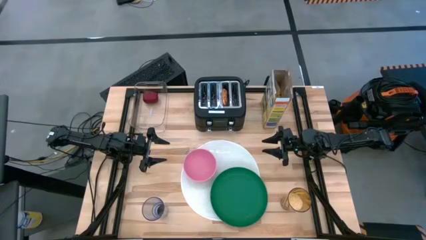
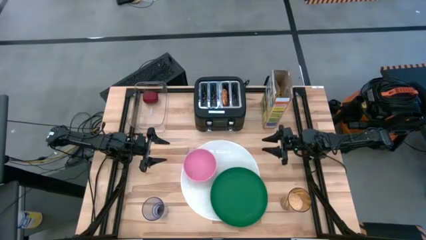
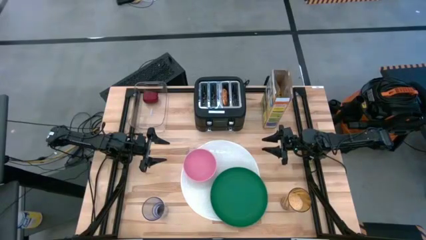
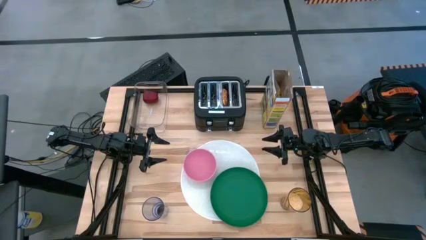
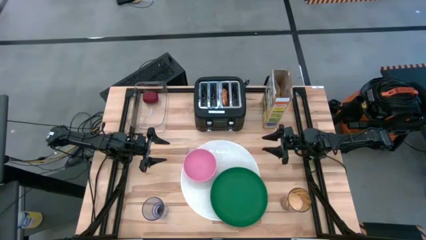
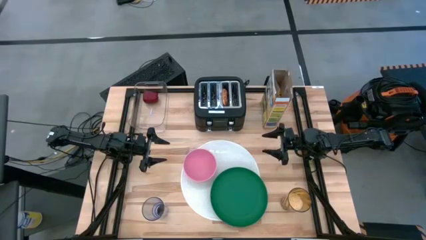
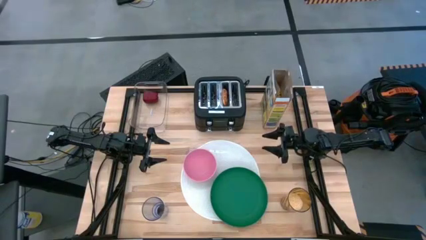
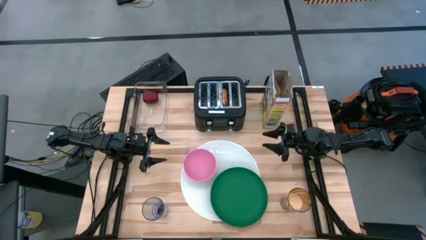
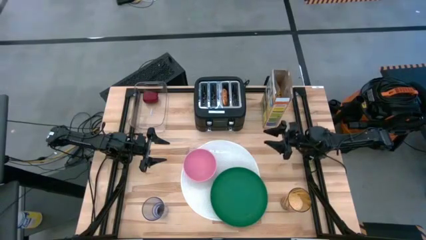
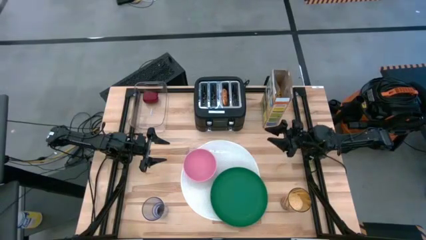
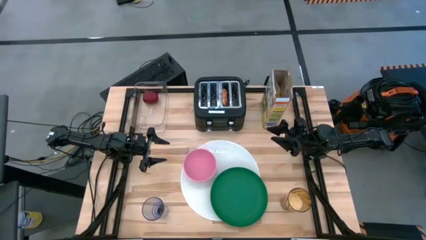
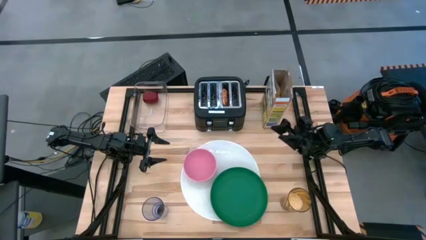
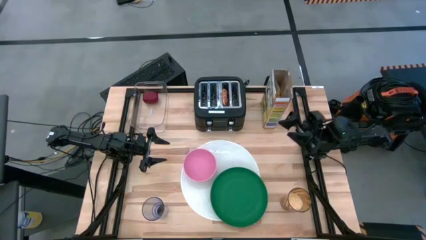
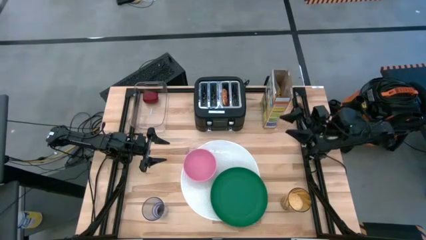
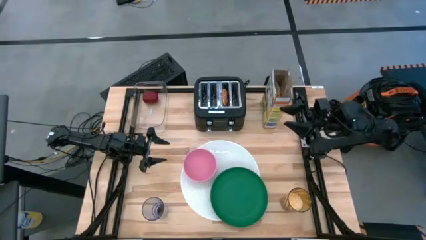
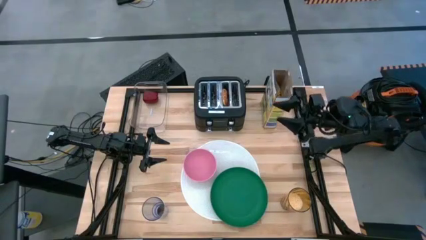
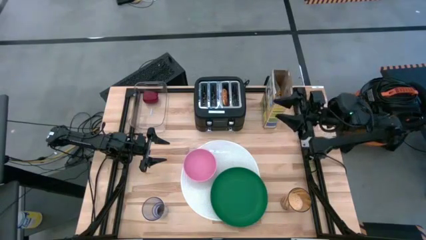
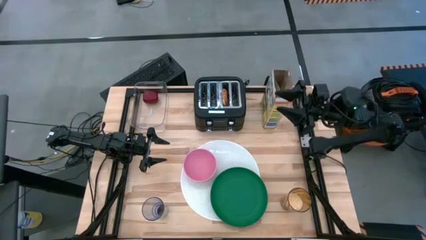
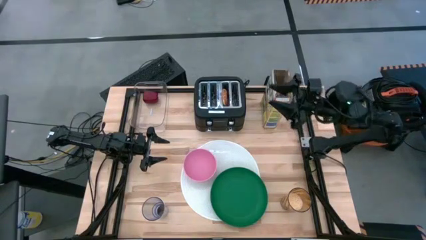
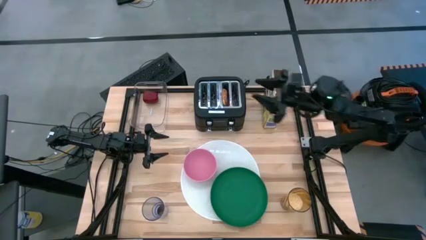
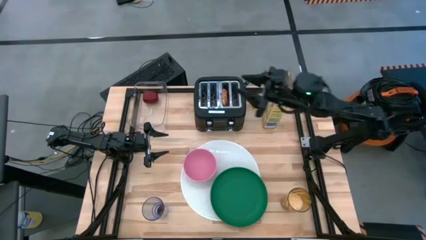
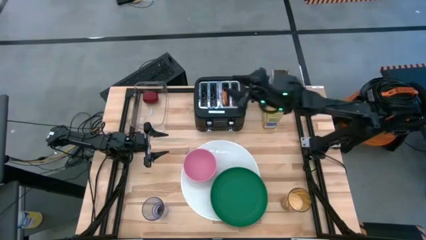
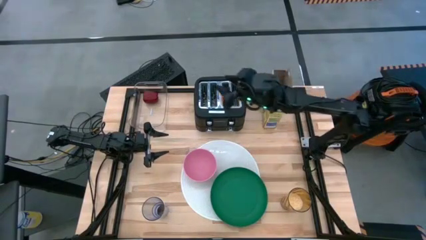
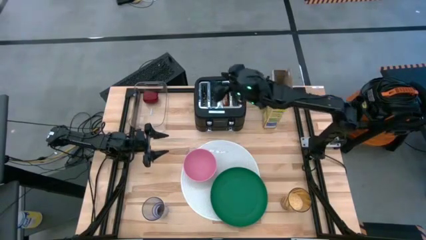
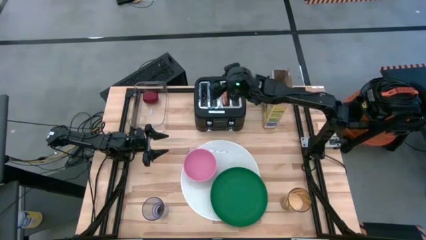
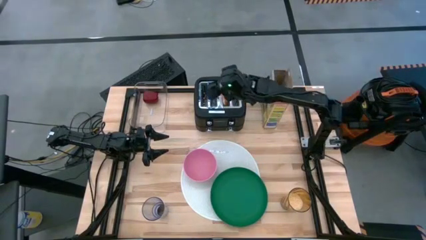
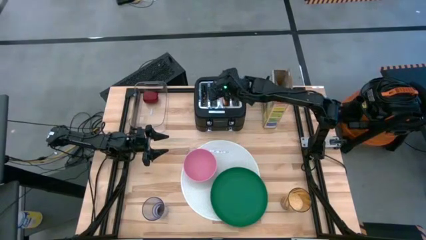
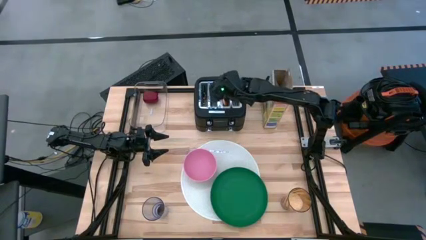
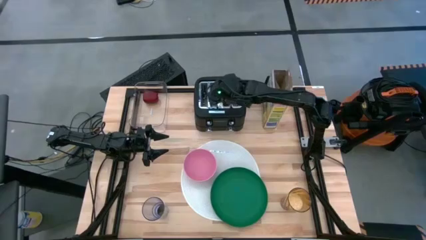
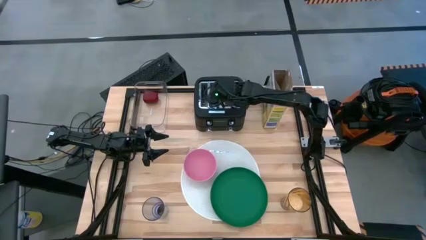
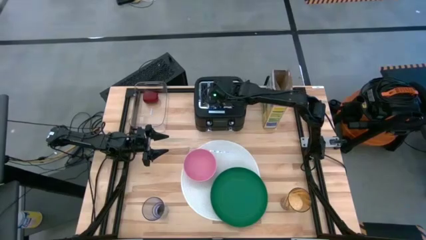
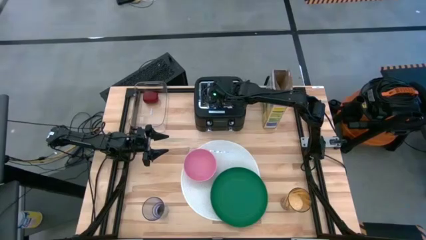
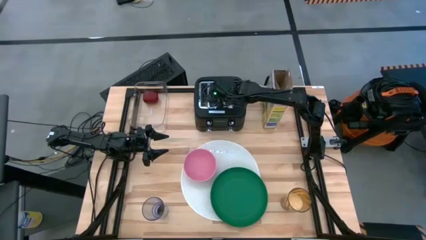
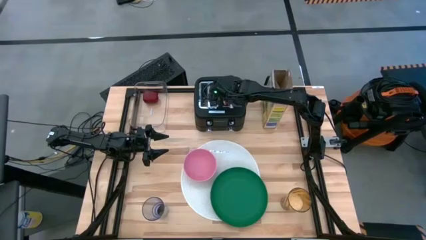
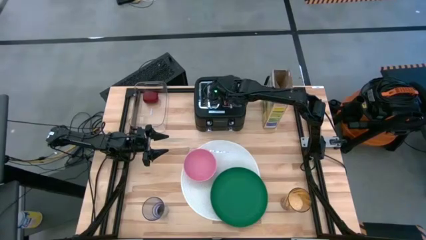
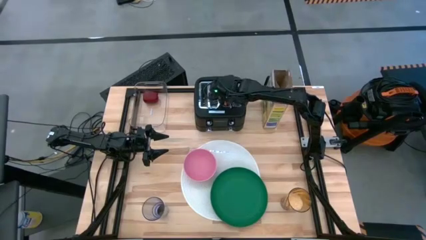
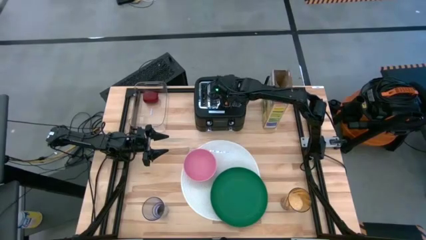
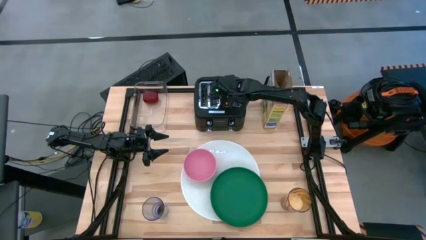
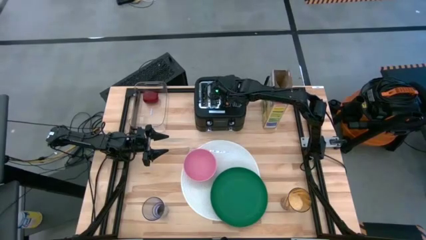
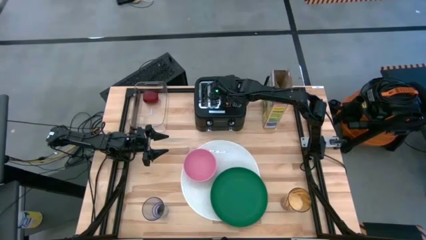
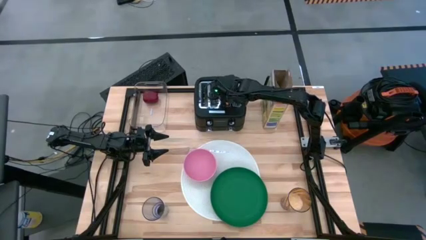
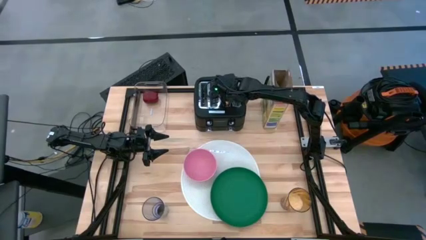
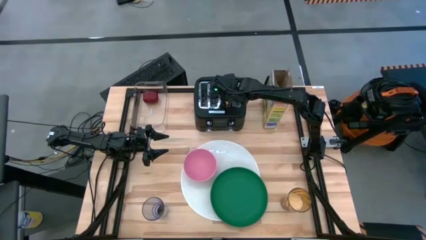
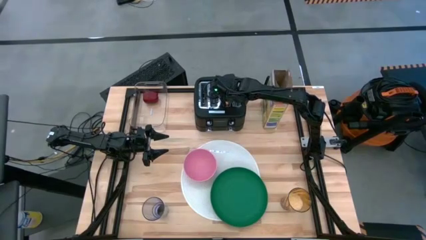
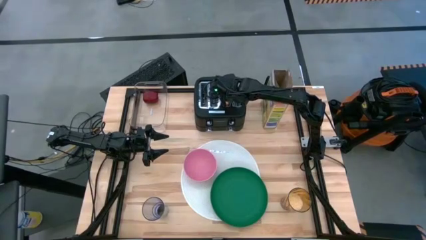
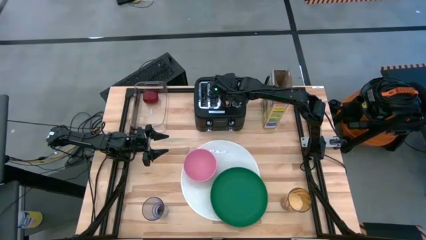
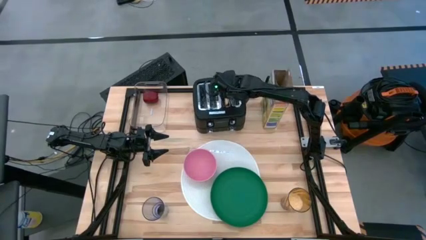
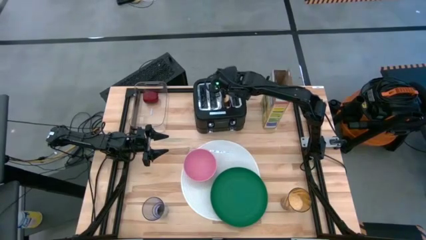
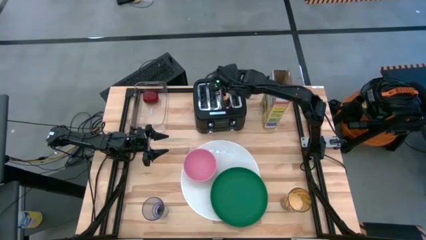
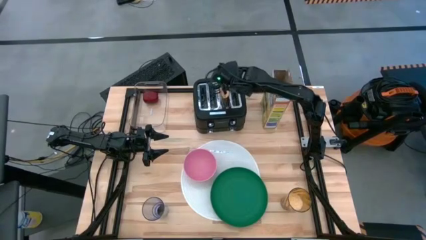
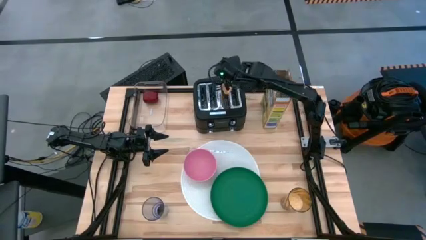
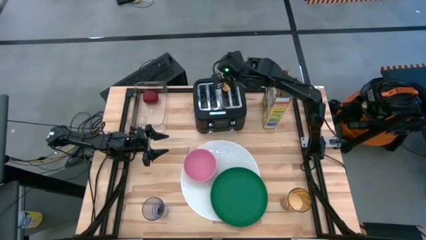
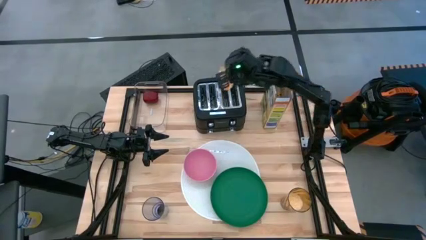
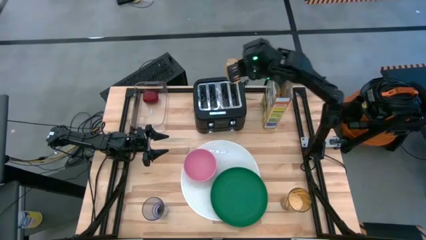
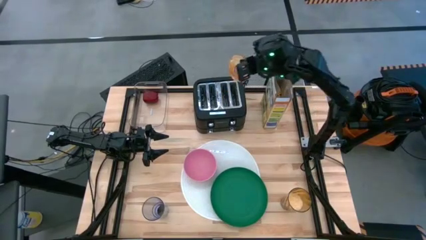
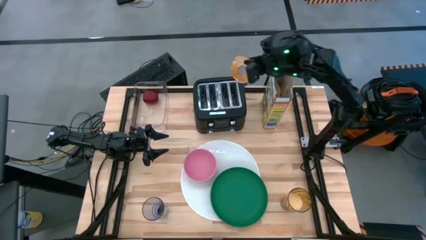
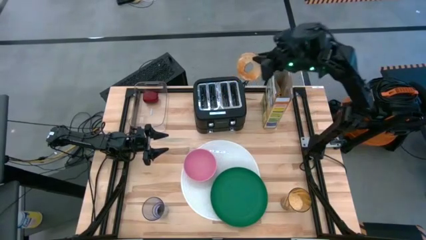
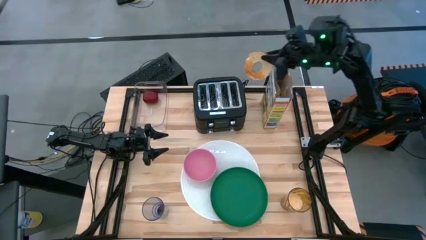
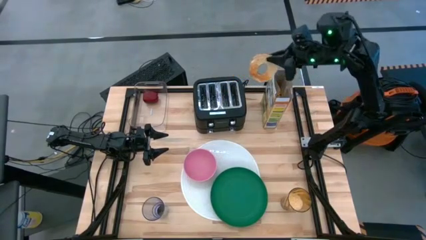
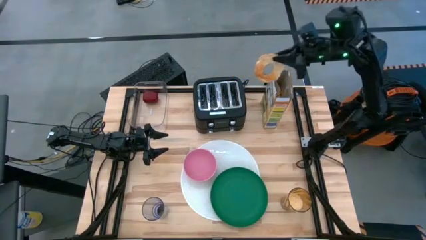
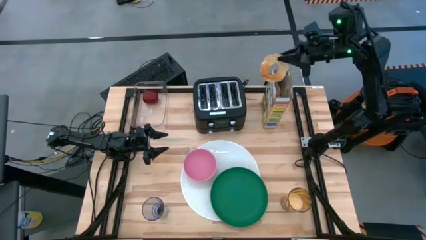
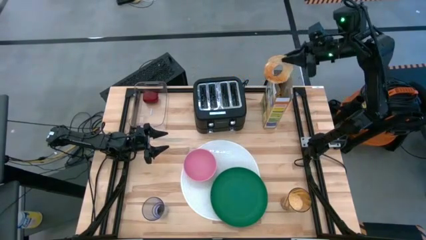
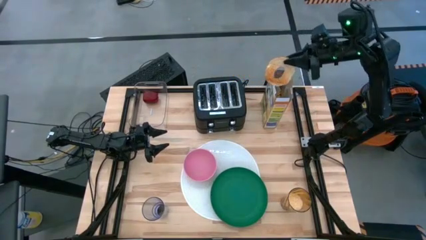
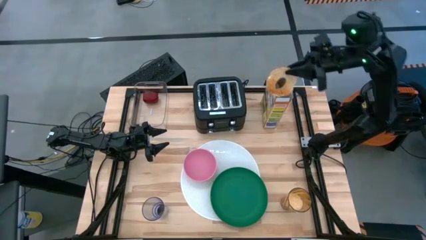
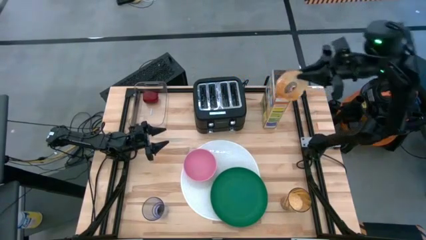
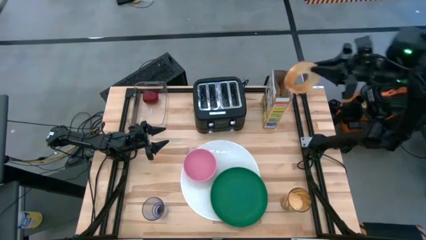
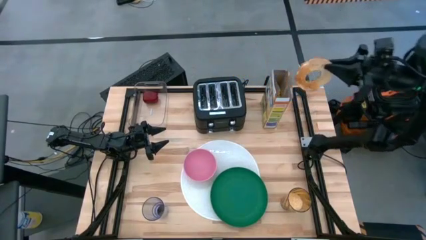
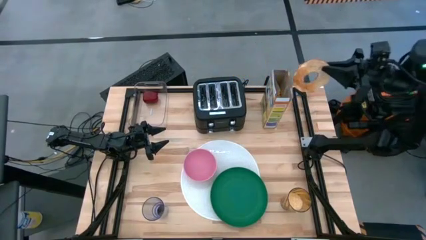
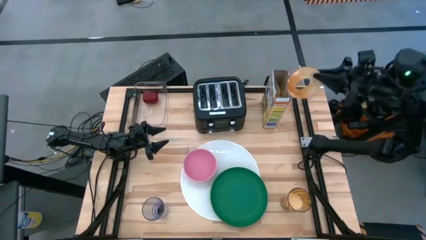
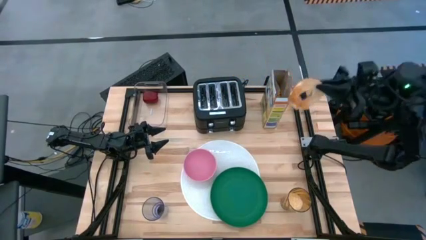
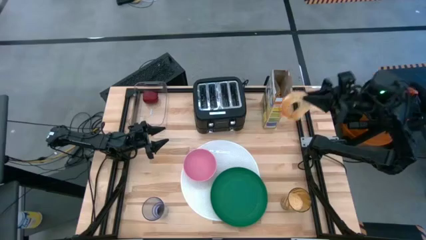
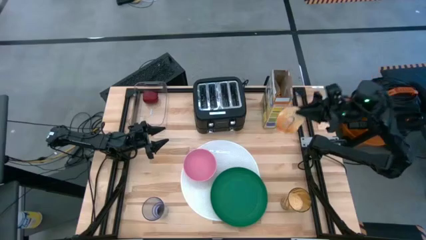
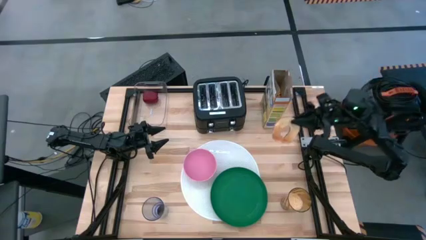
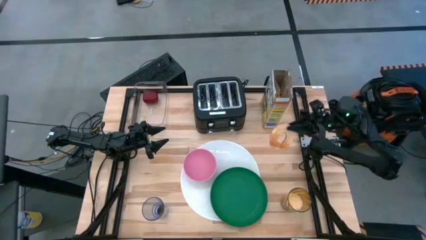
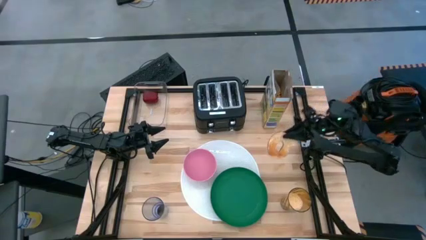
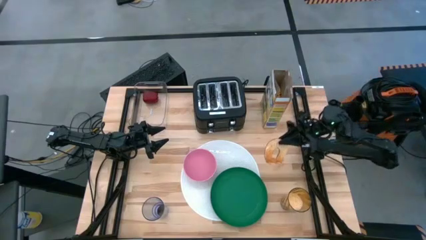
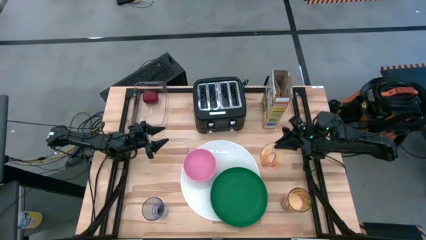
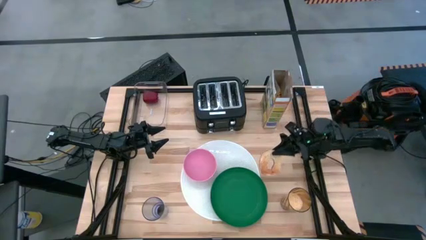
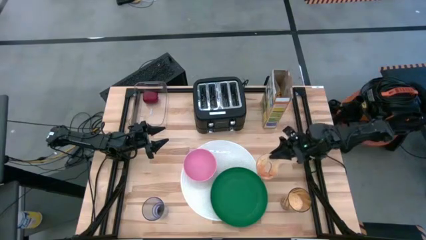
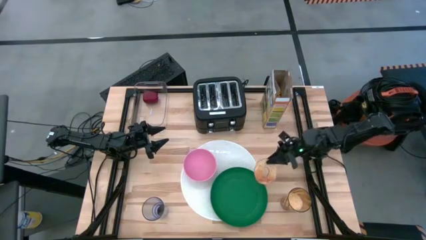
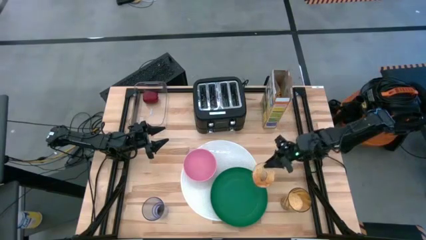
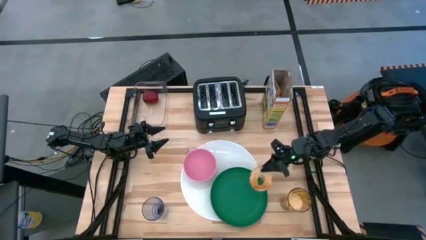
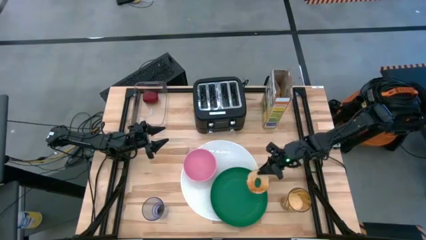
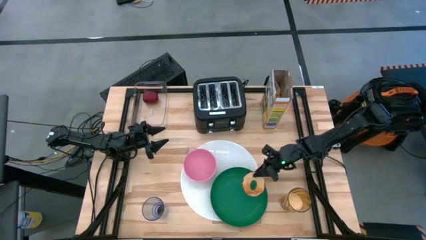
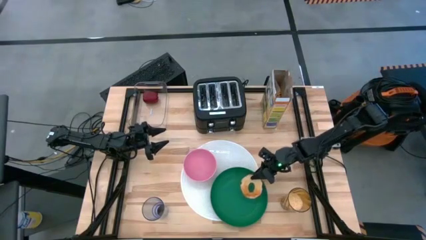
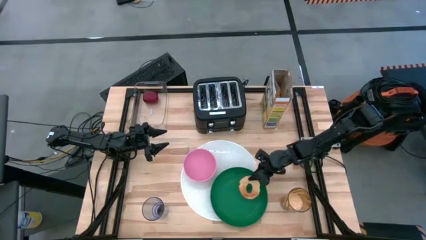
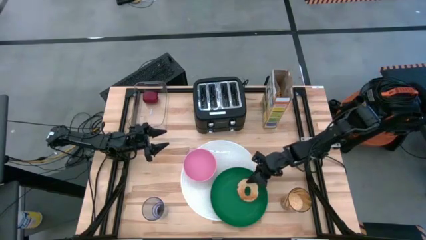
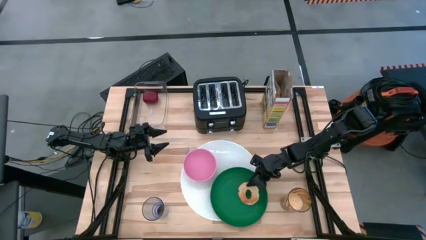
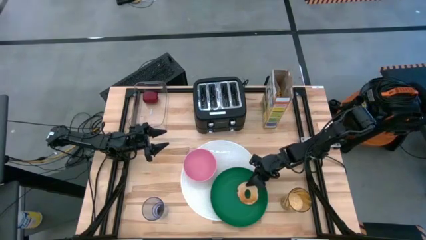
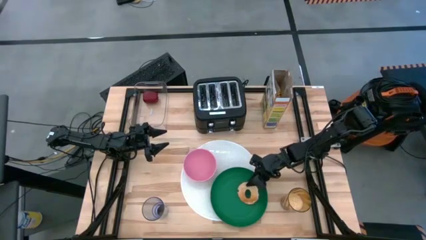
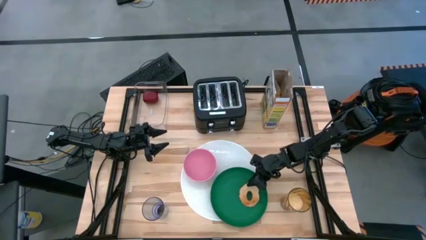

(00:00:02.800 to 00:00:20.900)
Task: Arrange a breakfast setting
Put the toasted bagel on the green plate
